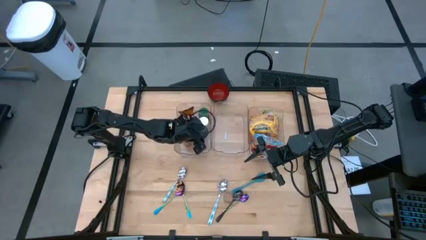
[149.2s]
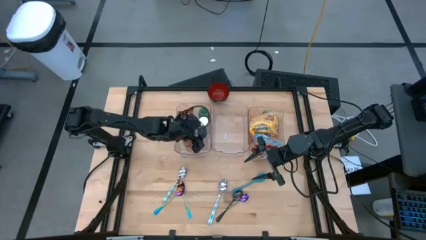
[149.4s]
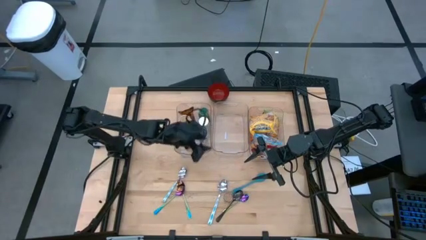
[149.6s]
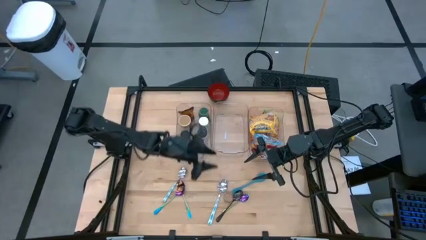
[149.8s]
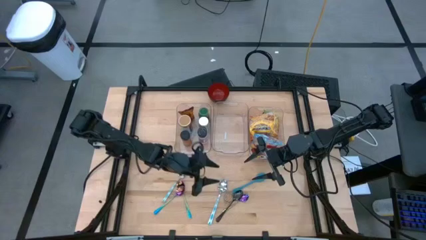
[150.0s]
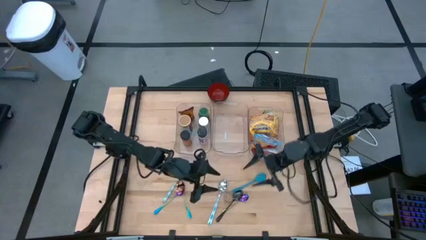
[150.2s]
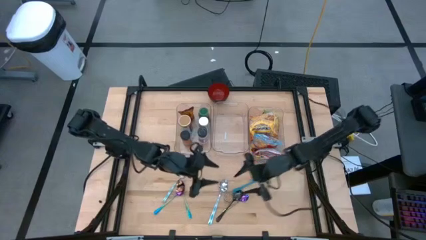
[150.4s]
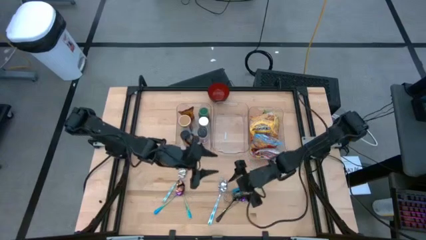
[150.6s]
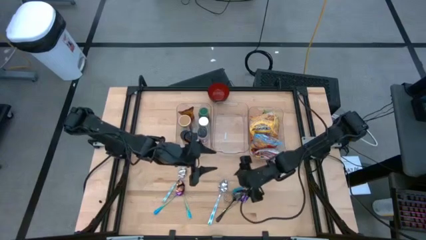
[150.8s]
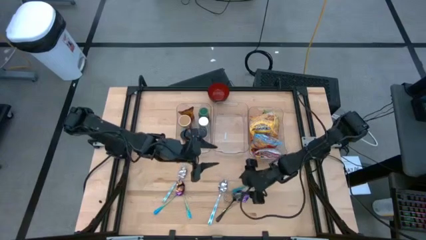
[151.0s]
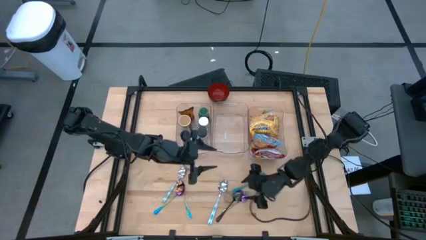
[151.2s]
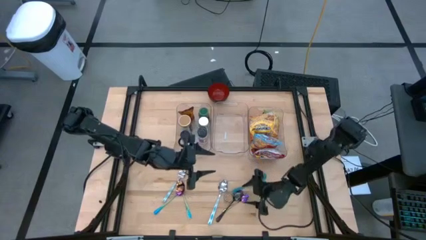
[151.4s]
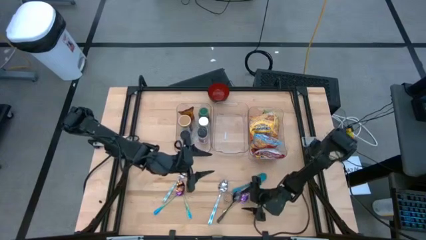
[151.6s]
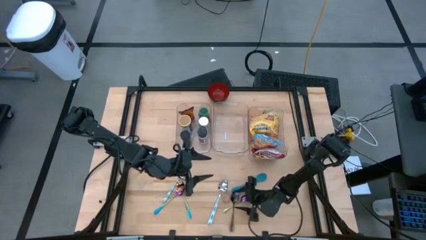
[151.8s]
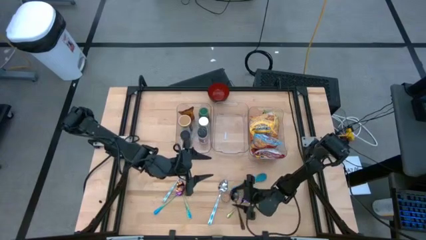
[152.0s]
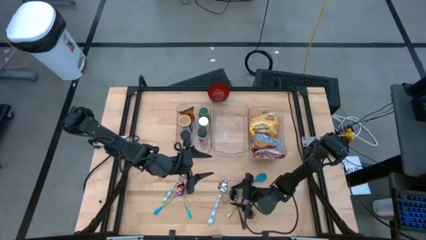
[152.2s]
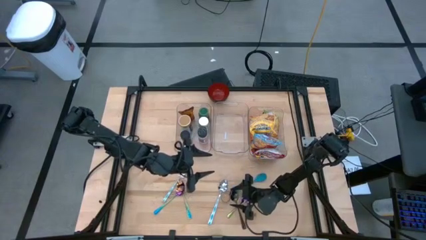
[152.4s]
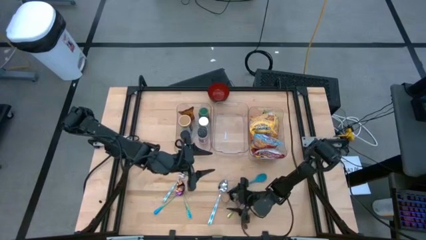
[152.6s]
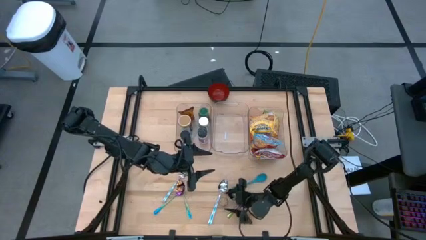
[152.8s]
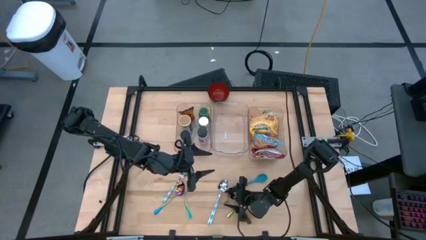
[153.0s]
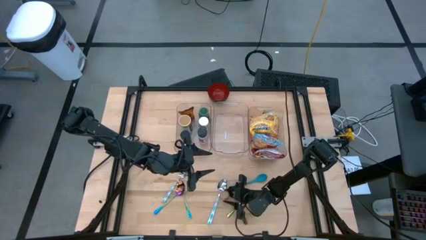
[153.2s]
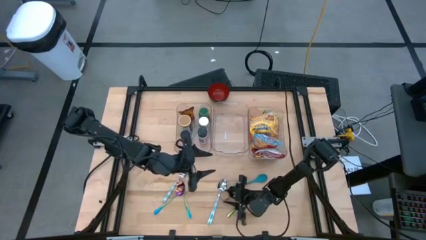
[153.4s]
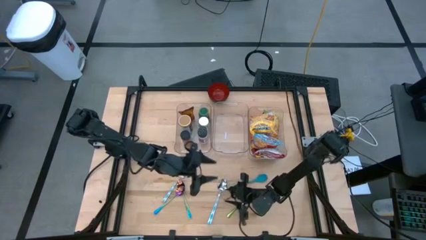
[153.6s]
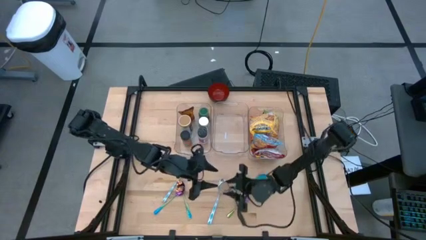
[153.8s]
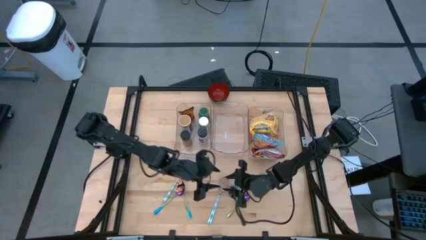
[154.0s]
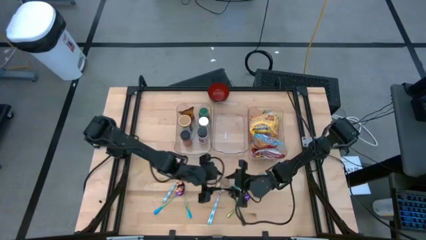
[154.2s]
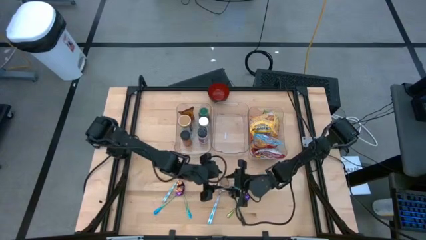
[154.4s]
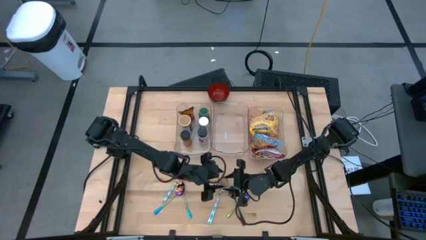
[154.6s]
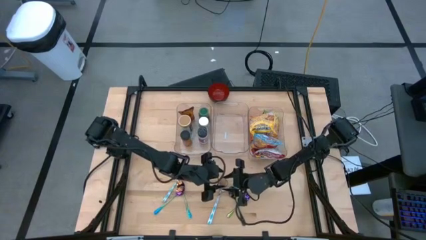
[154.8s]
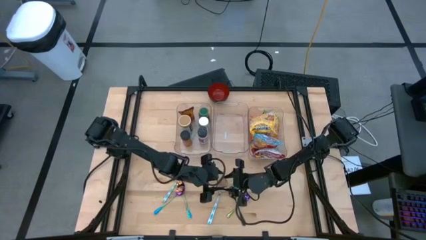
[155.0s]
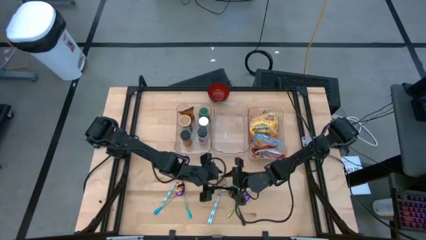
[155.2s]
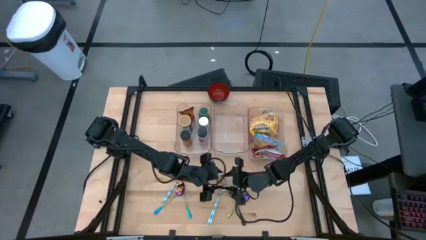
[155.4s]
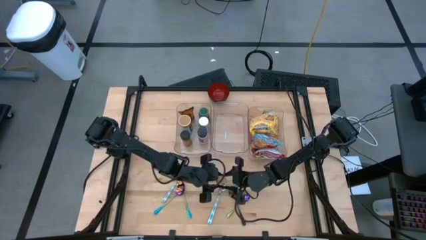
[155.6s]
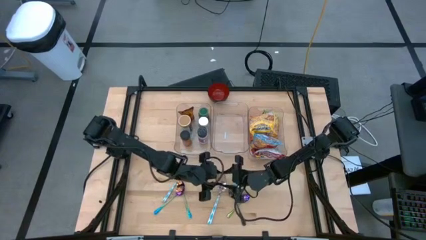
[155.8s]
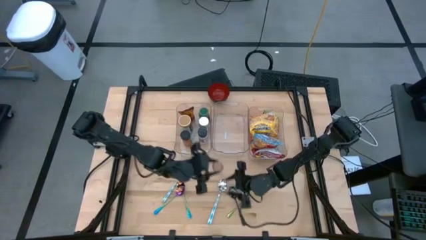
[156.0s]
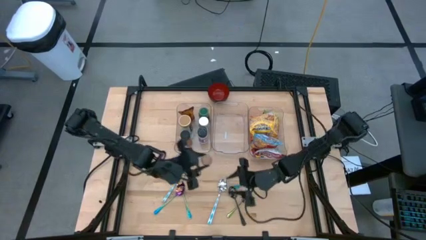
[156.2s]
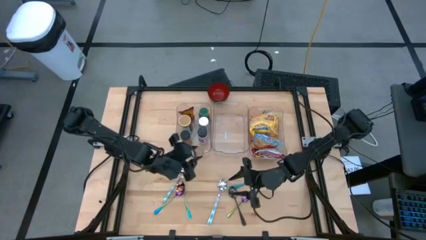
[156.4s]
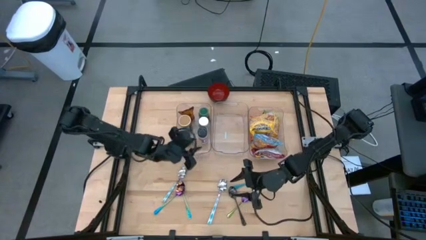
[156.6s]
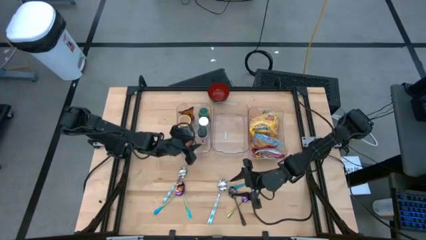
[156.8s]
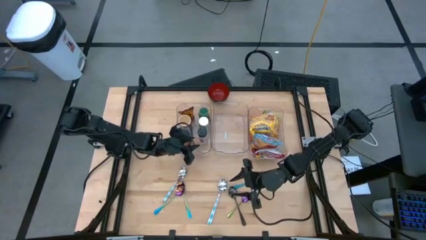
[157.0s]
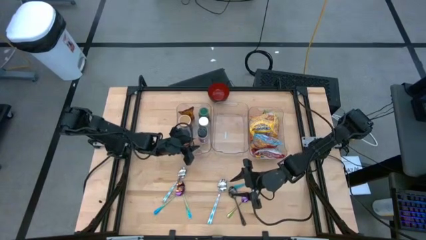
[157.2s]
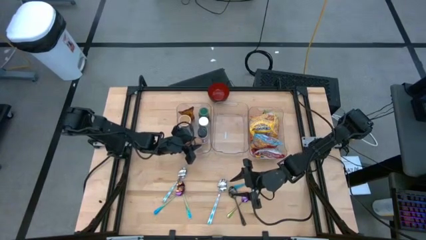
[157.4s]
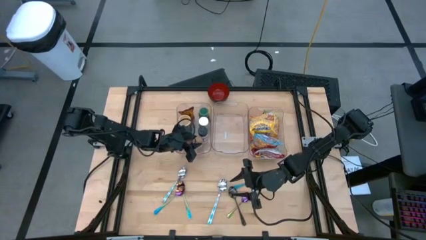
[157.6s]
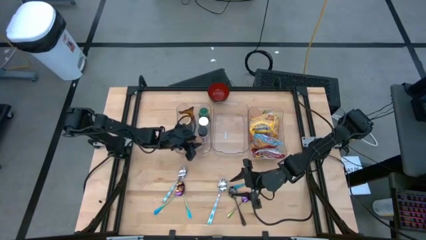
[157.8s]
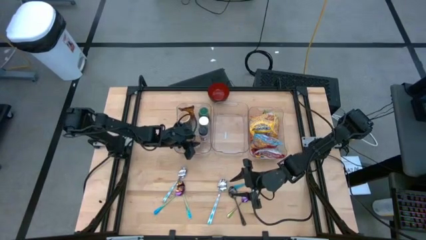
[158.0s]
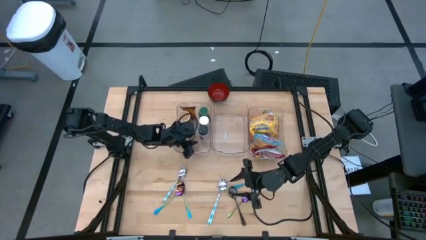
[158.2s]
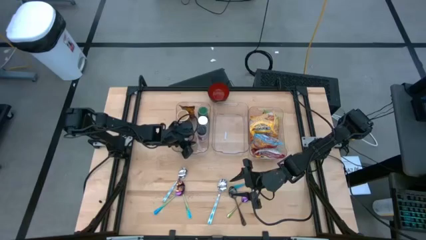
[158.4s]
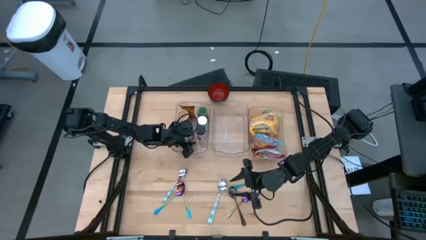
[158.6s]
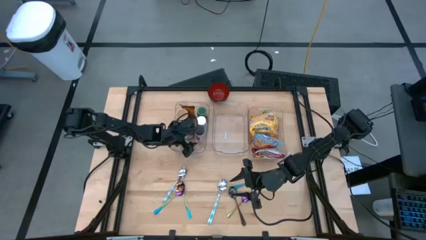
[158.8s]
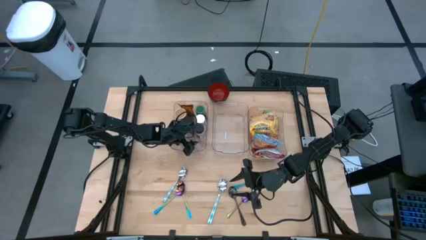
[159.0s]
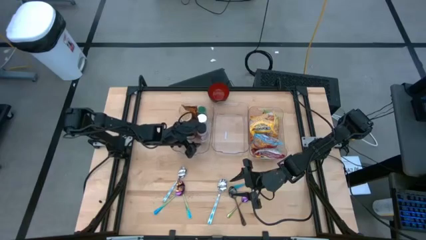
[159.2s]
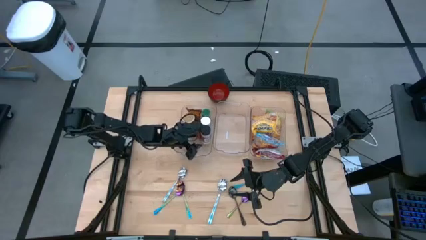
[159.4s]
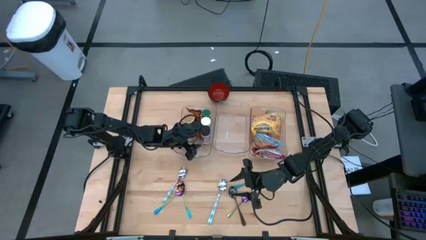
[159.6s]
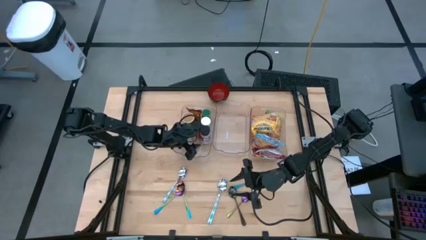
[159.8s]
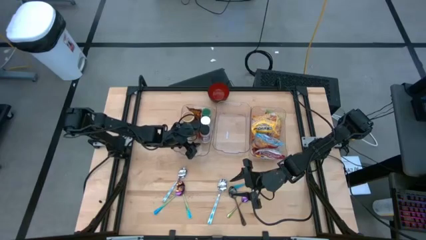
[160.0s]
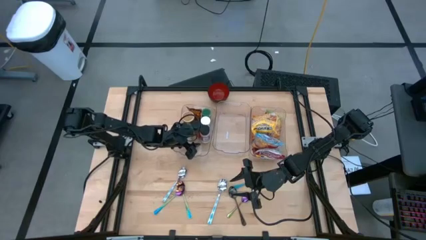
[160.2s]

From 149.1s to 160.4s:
Task: Pick & Place Food Item
Put the brown seasoning bottle into the left transparent bin

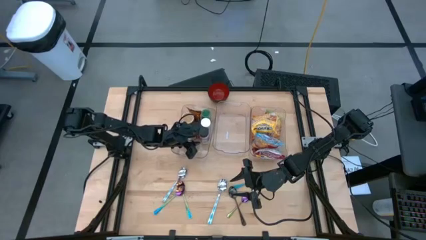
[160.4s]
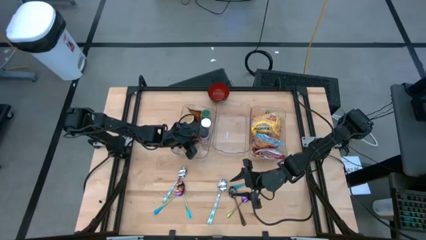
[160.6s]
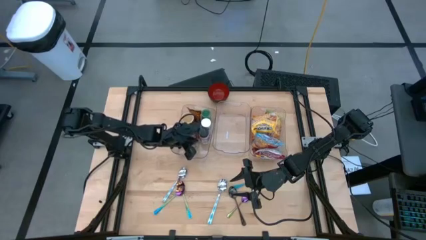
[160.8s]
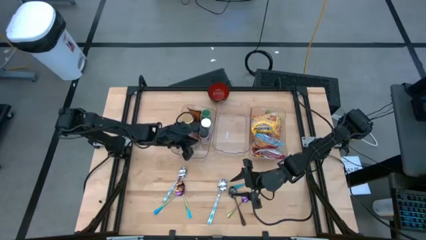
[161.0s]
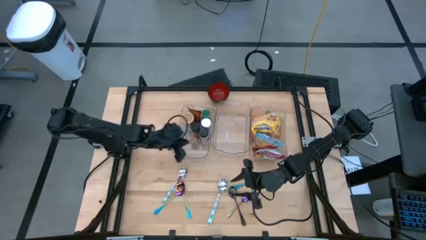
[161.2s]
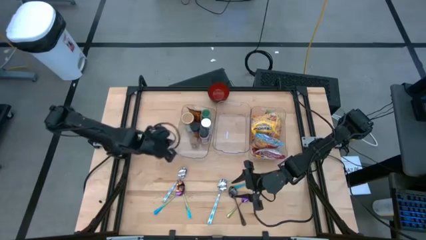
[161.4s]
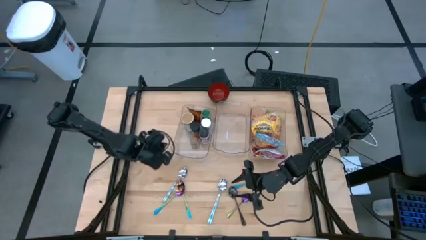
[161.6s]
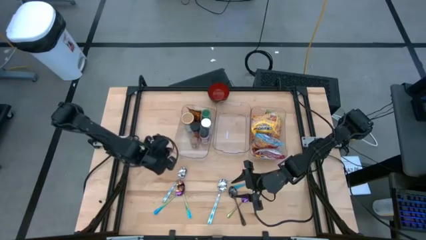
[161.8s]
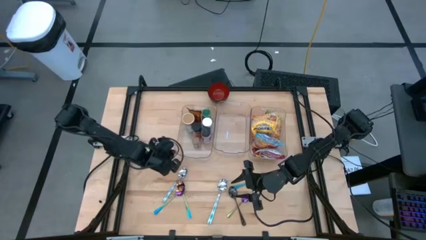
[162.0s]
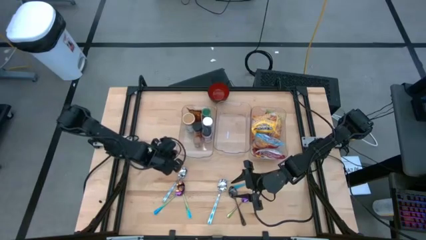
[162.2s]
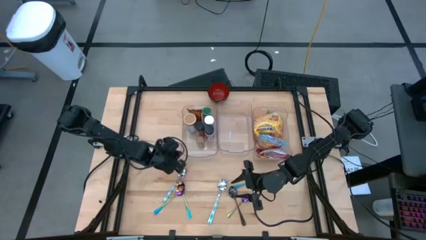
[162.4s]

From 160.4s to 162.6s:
Adjust the left transparent bin

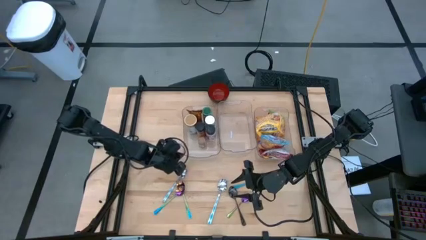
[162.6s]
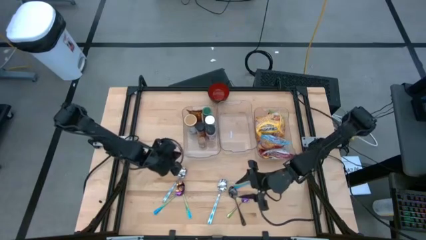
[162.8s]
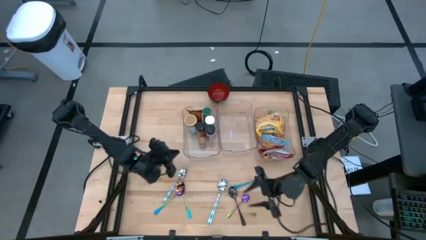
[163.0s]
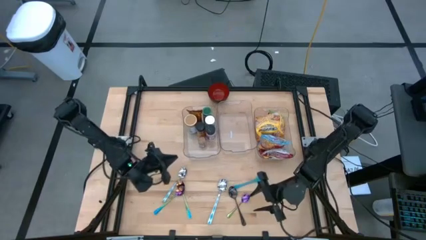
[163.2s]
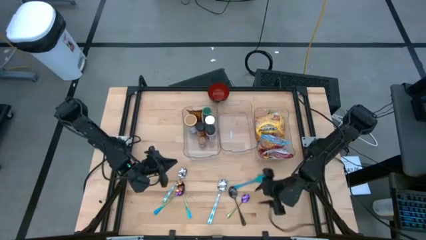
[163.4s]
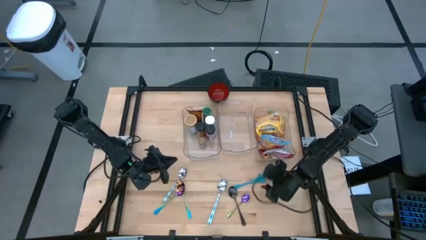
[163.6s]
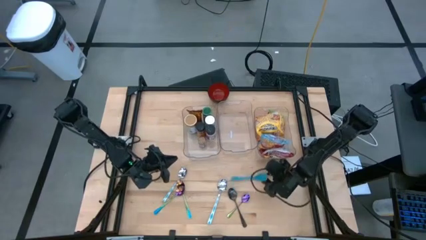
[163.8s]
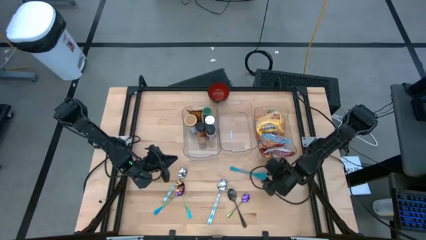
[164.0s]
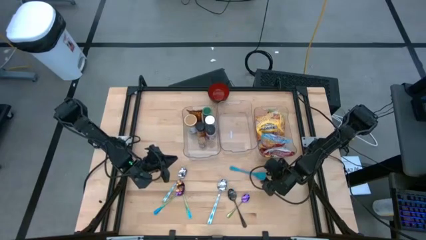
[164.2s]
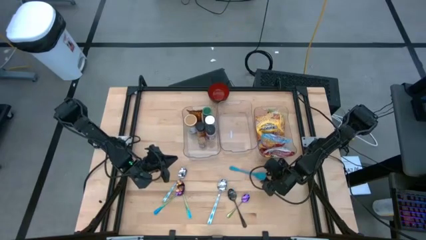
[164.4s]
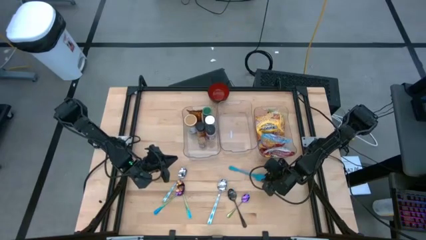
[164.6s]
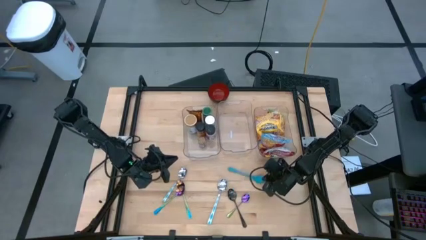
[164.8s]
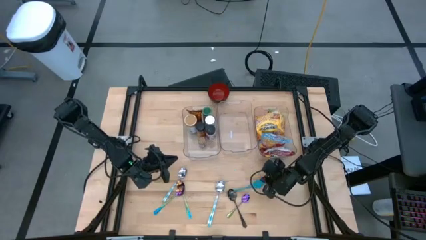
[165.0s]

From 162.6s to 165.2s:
Put the blue spoon into the middle transparent bin
